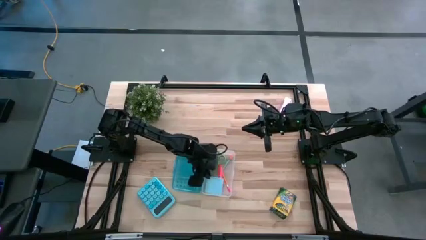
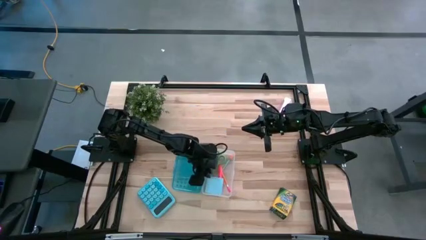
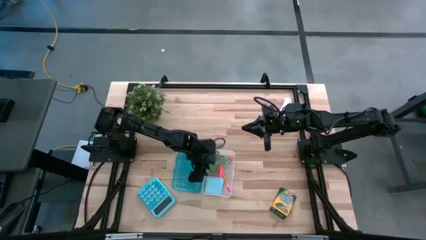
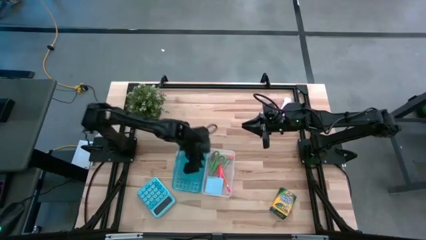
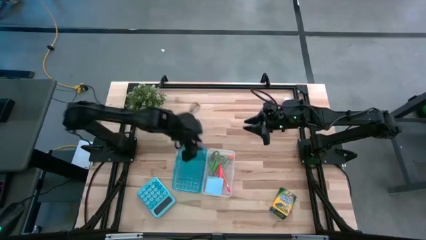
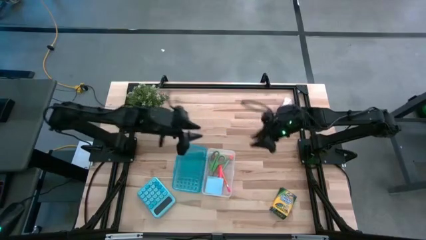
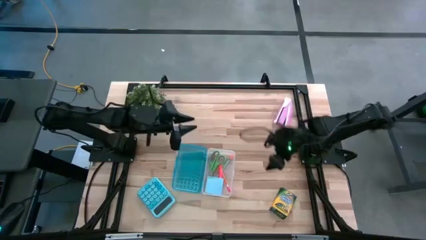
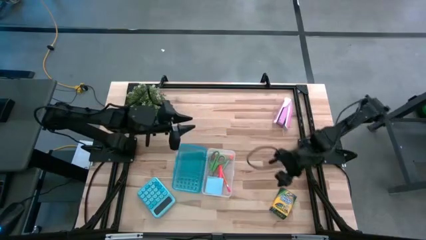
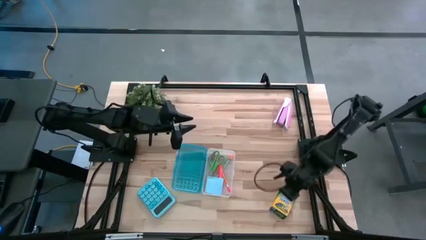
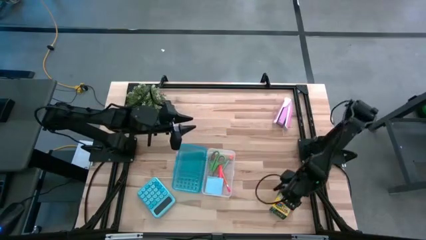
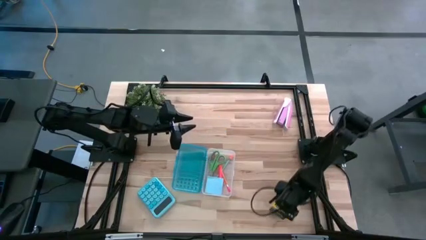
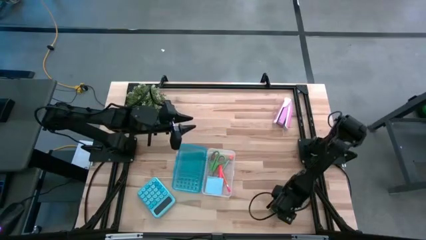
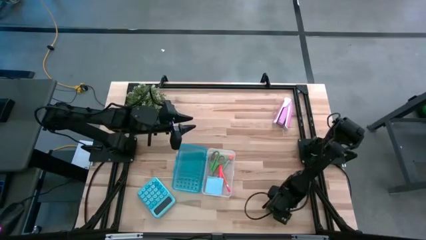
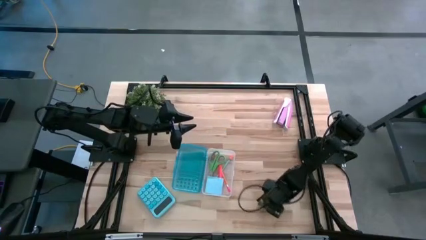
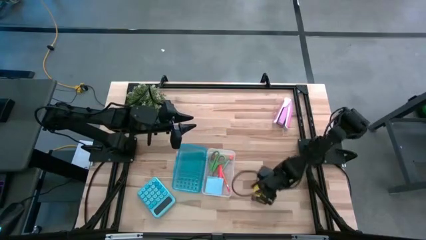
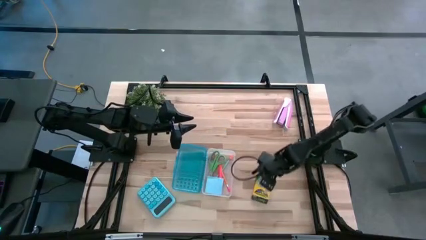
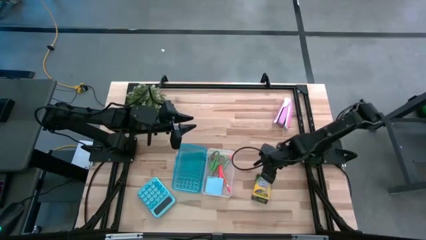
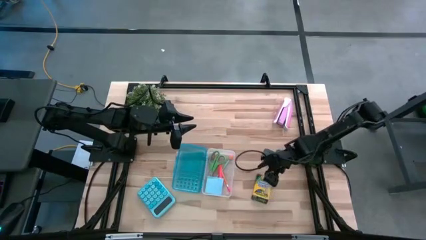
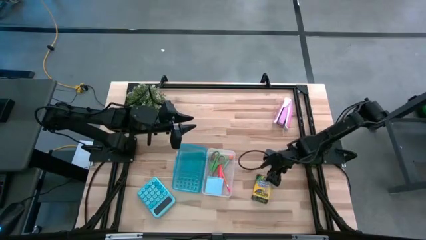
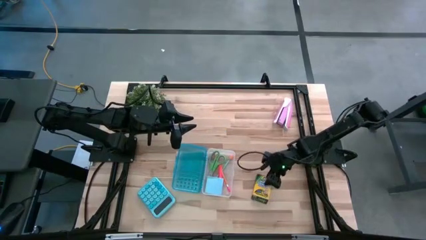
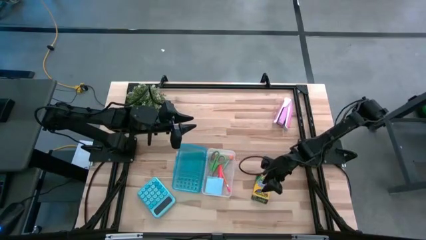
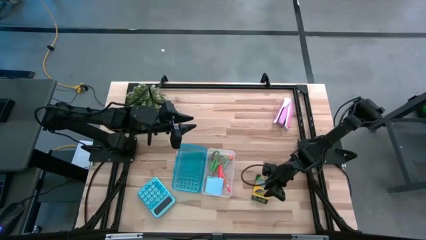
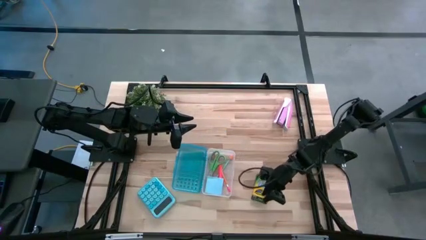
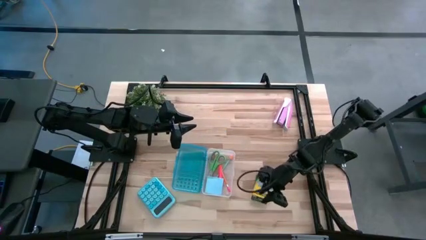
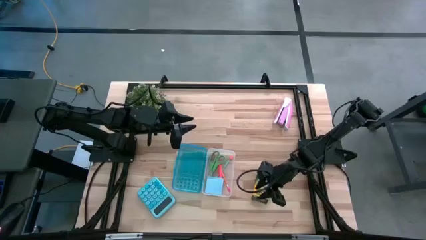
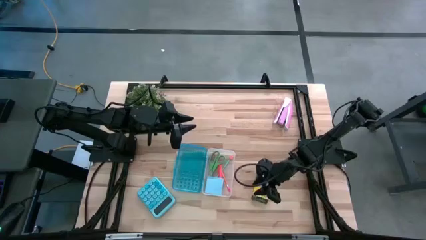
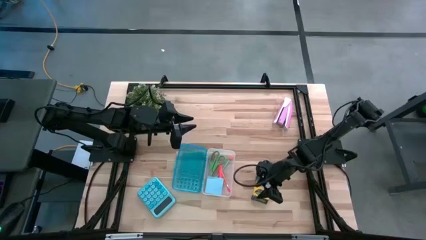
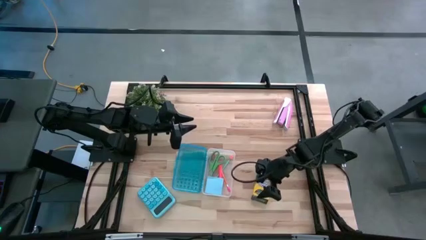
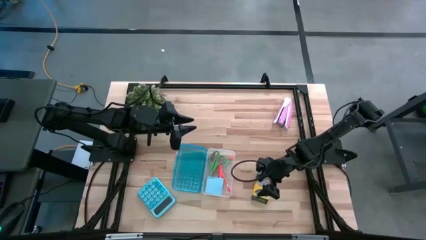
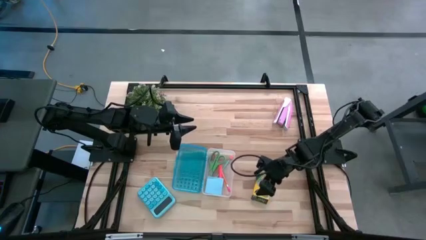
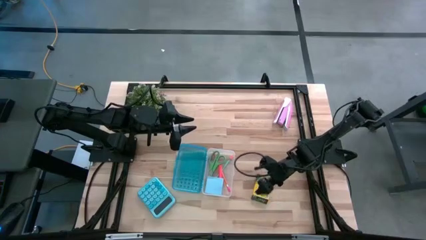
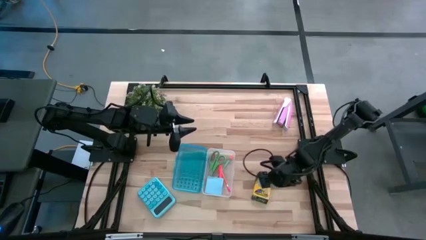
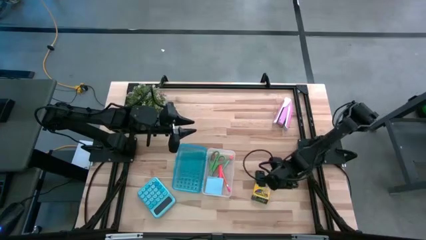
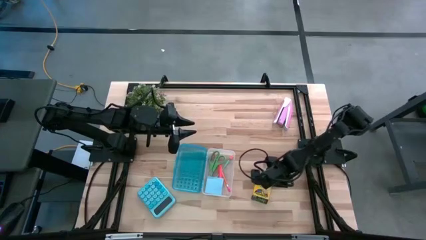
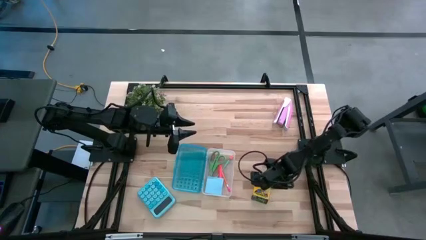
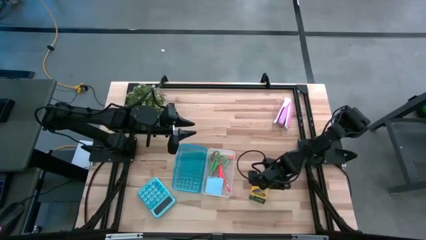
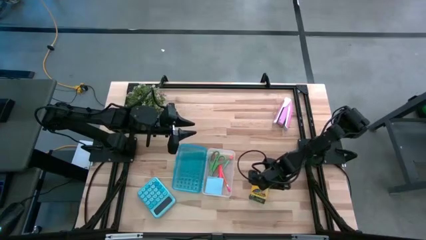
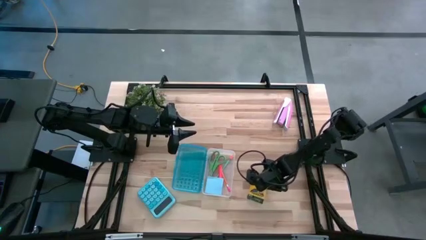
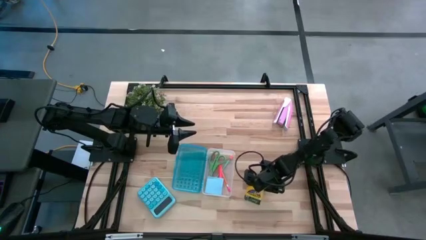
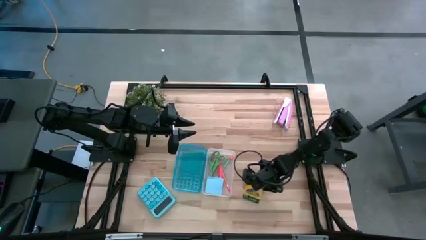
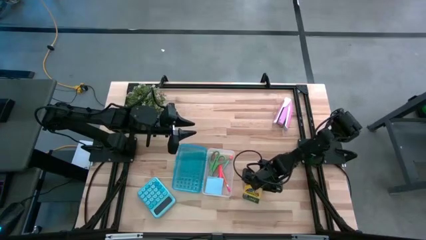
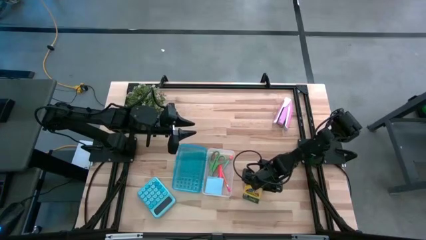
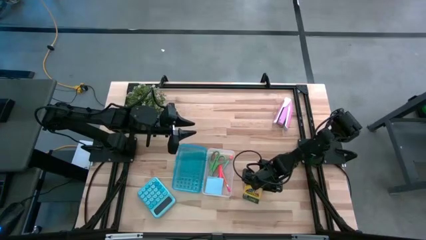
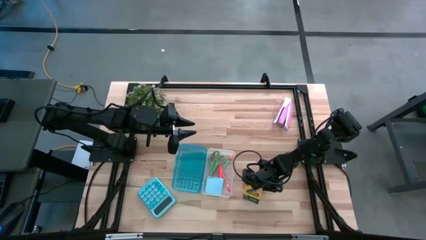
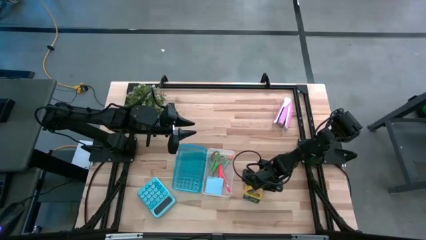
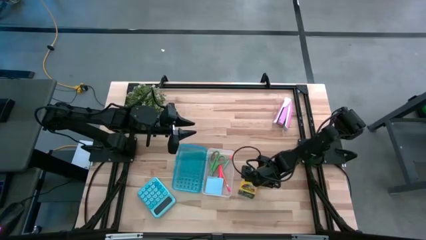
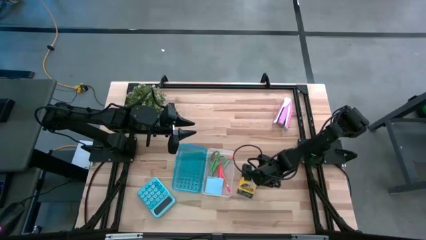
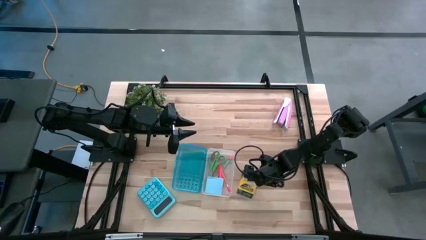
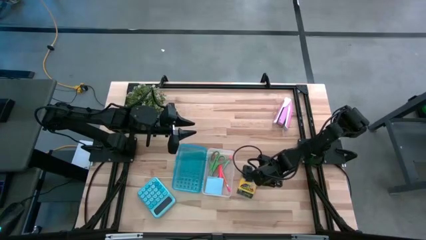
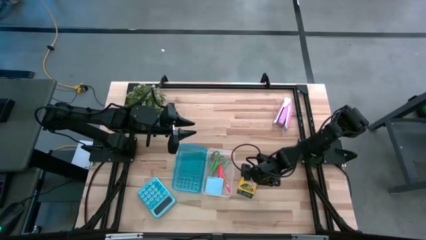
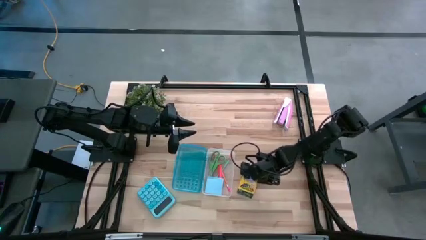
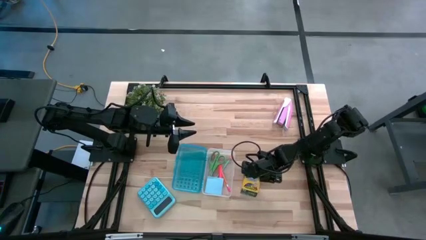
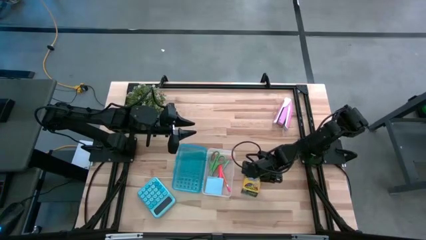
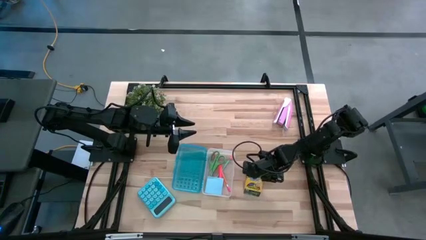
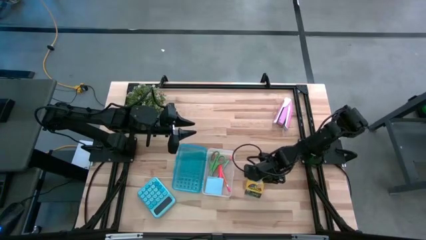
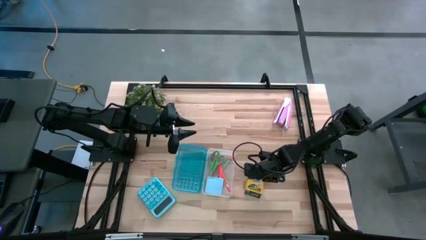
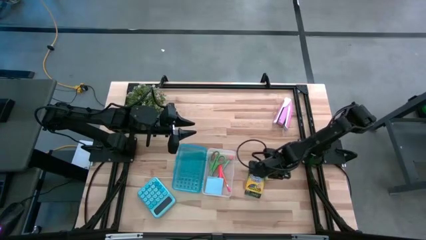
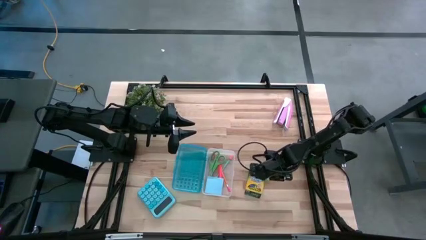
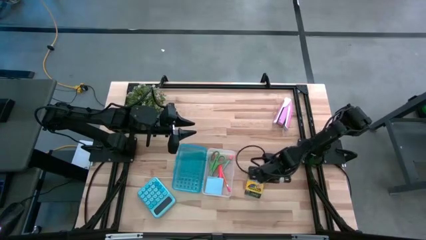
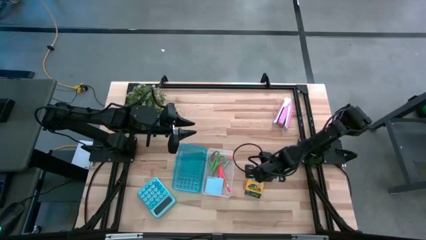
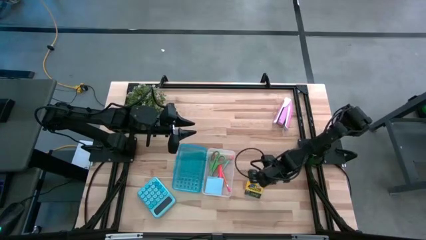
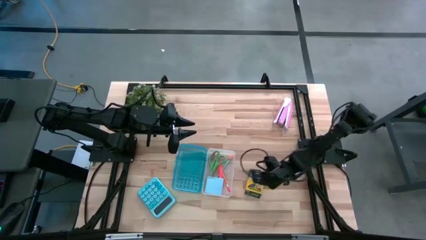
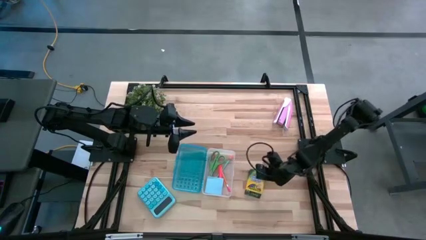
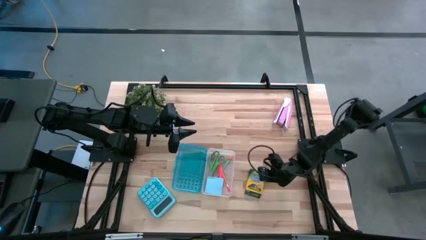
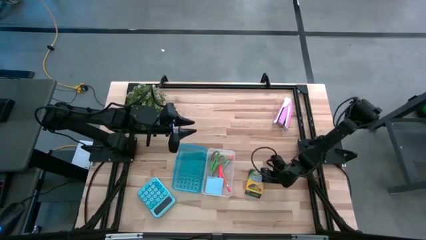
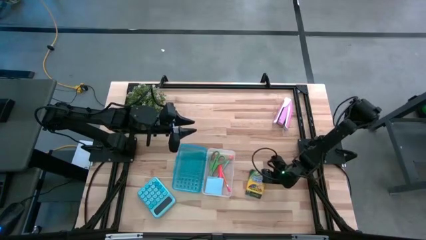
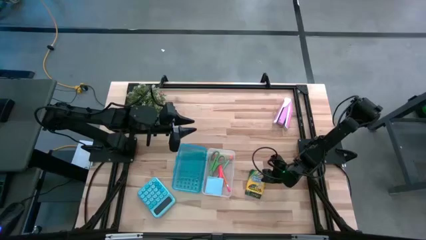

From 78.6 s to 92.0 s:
Task: Pack school essentials
Put the yellow crayon box into the blue supply box

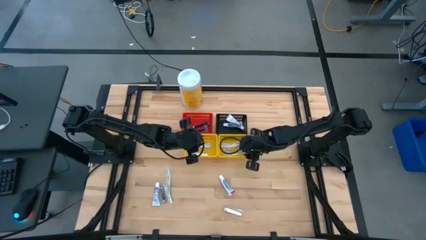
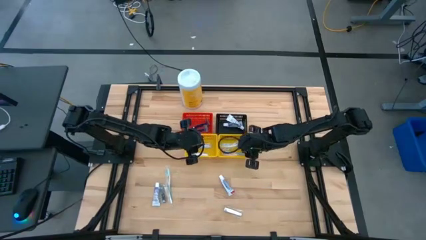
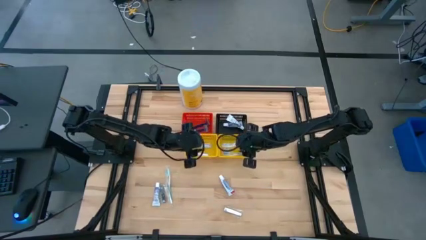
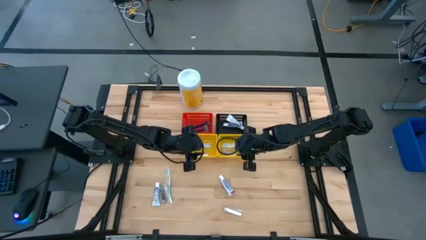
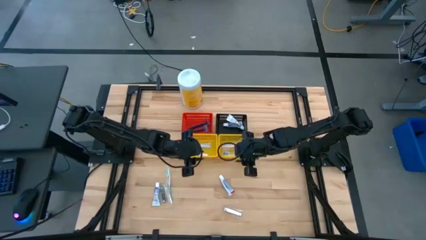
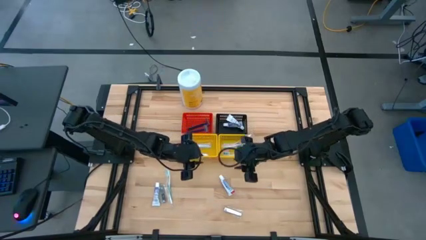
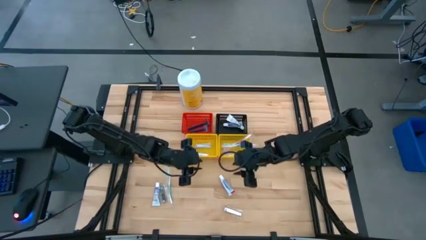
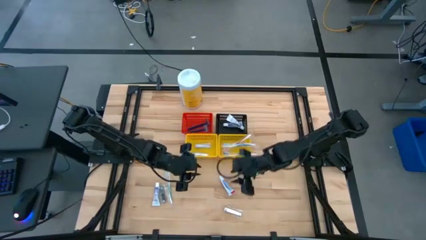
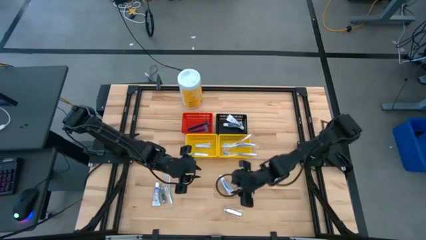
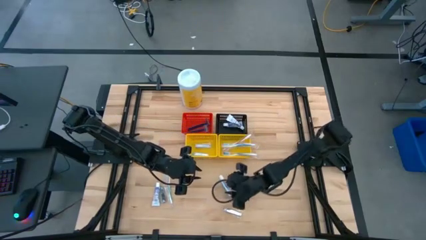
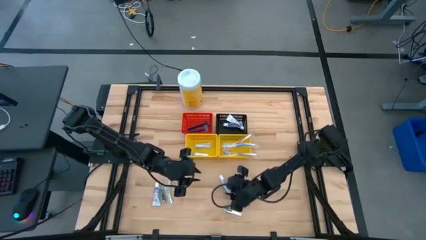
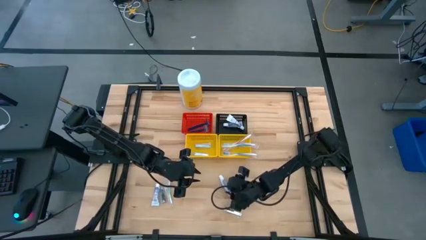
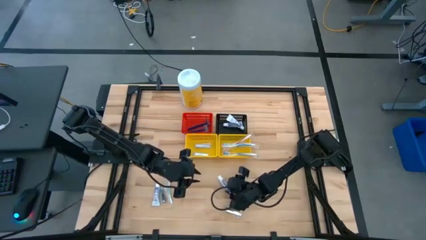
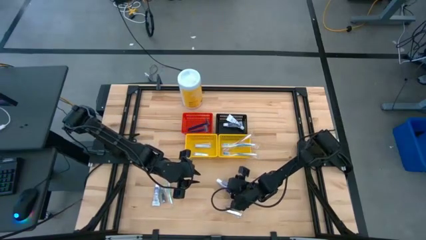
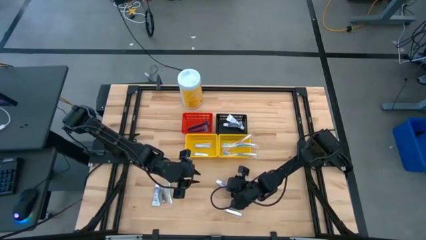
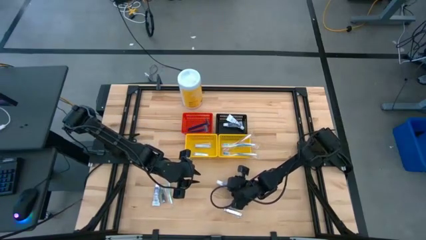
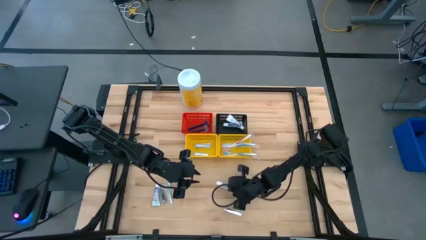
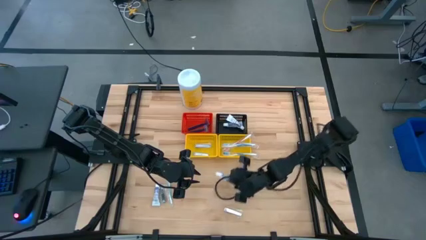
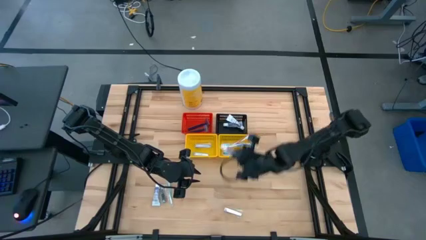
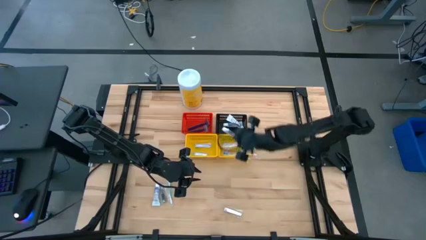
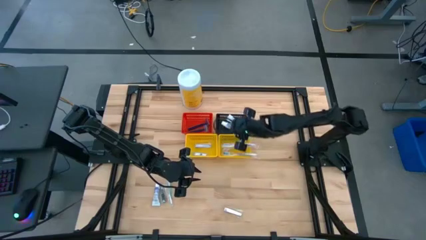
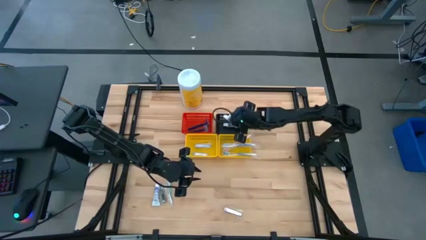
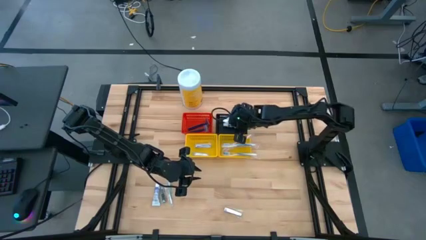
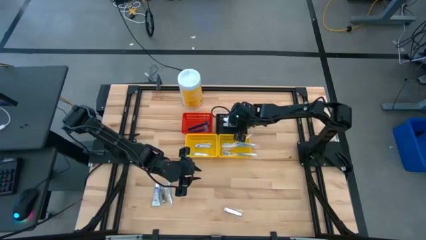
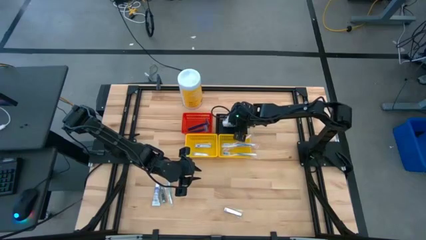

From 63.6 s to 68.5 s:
Task: Pick & Place Travel size toiletries
Put the white toothpaste into the black bin
